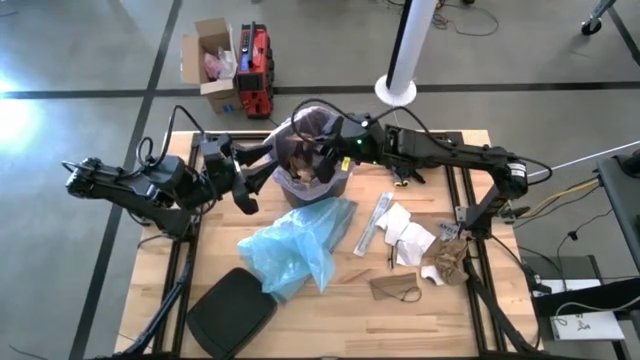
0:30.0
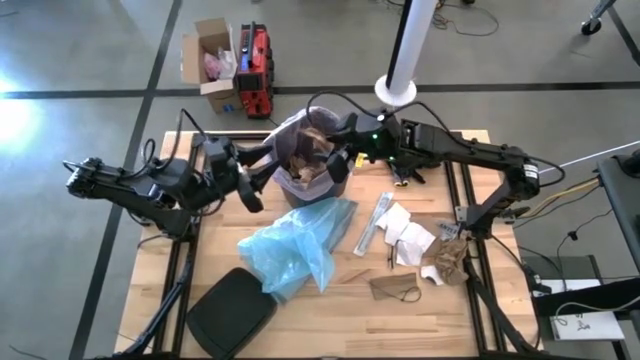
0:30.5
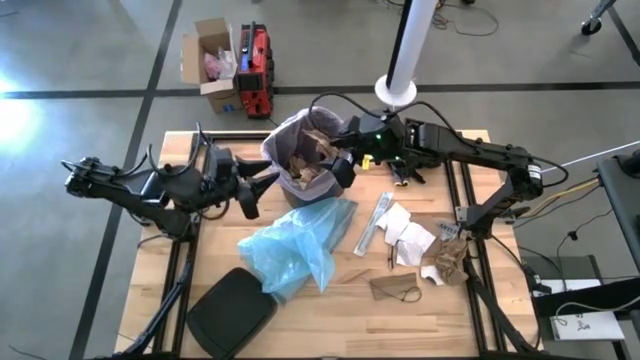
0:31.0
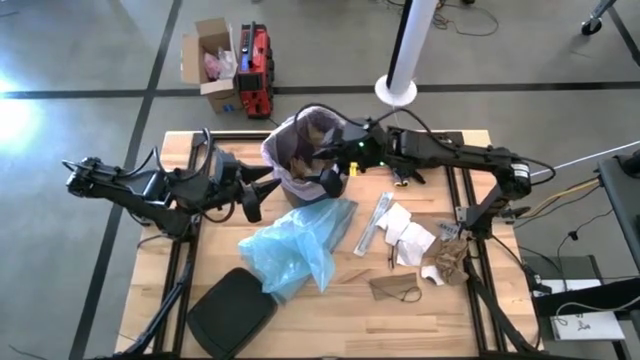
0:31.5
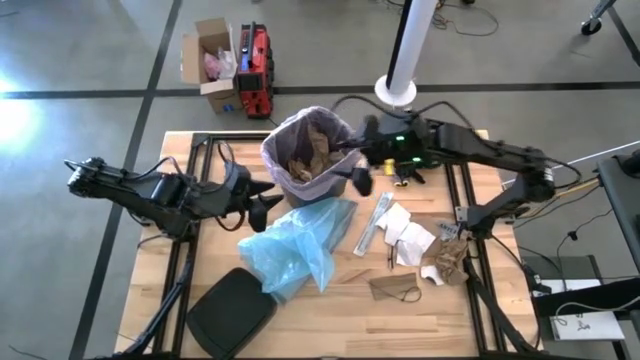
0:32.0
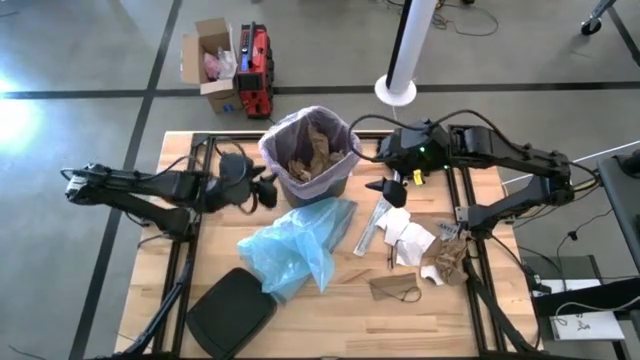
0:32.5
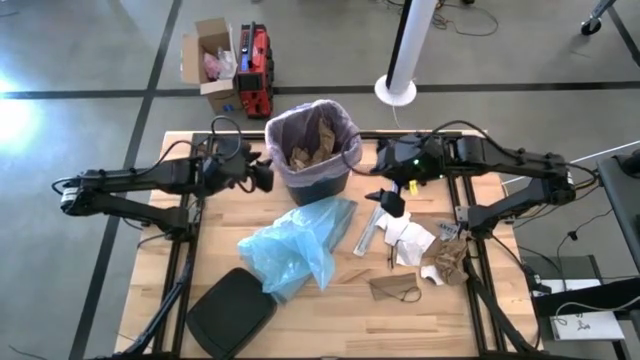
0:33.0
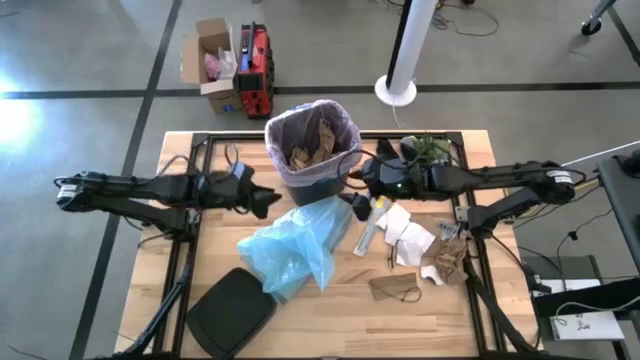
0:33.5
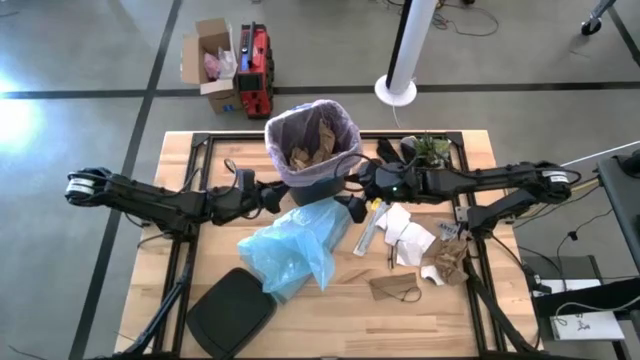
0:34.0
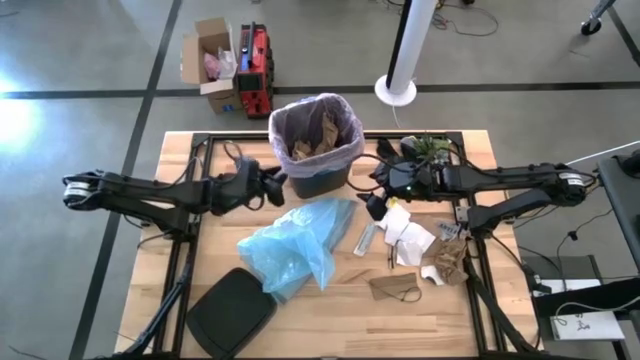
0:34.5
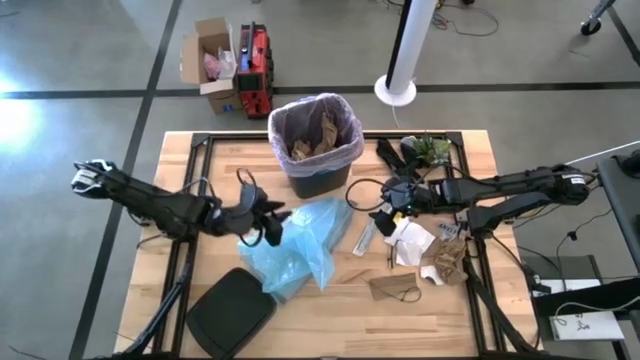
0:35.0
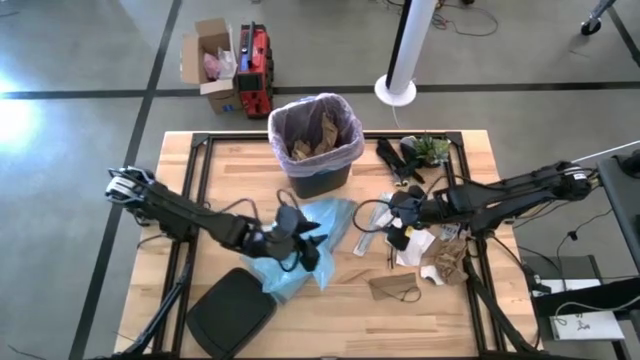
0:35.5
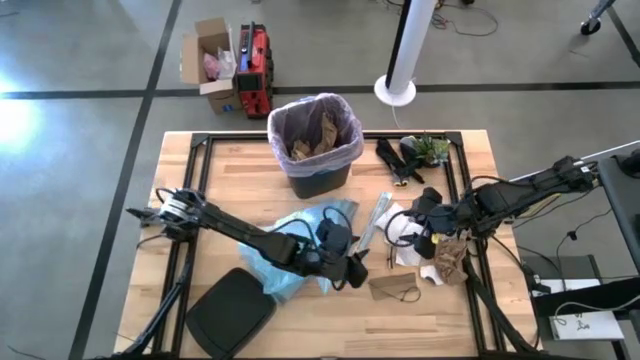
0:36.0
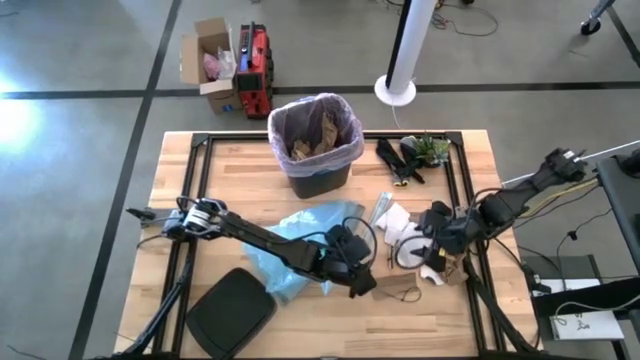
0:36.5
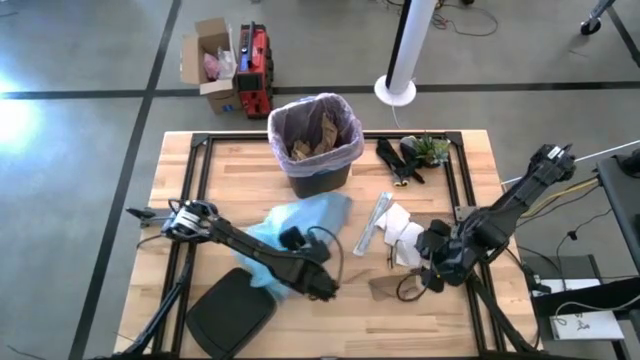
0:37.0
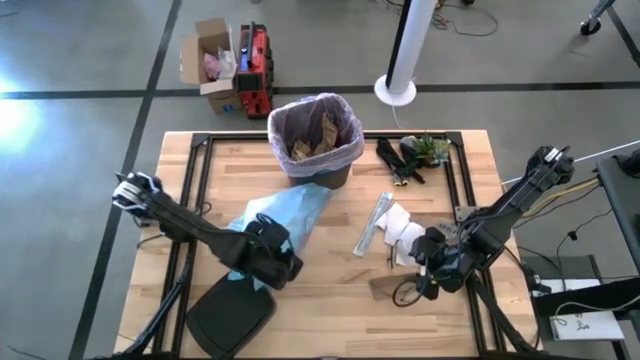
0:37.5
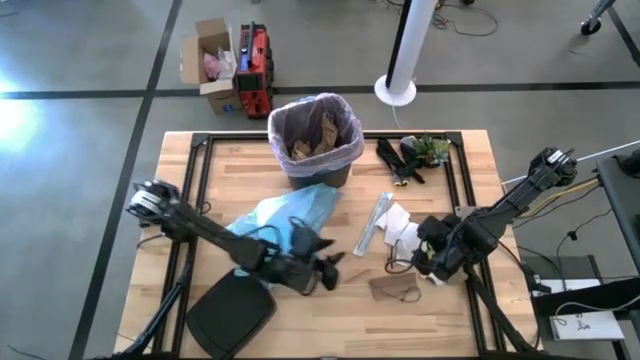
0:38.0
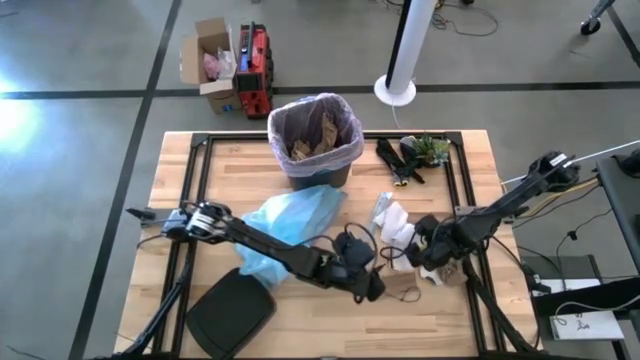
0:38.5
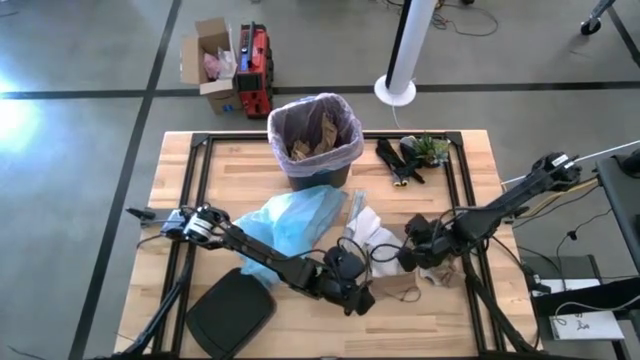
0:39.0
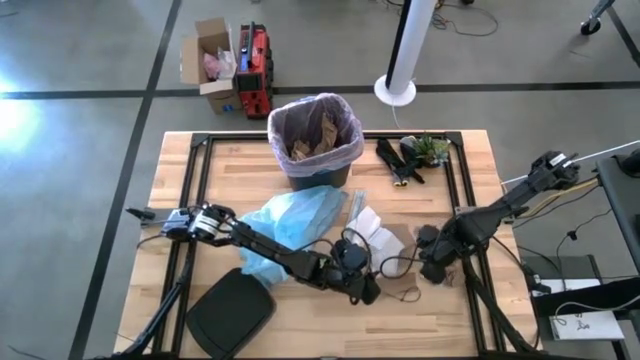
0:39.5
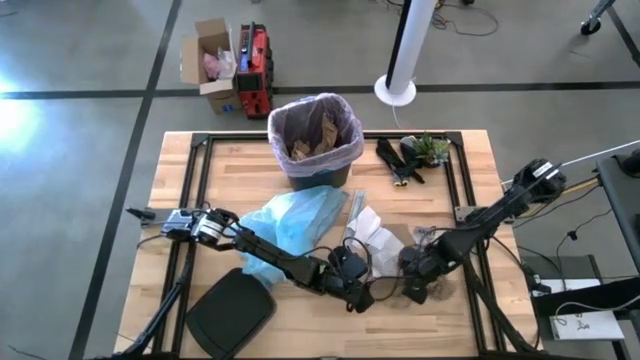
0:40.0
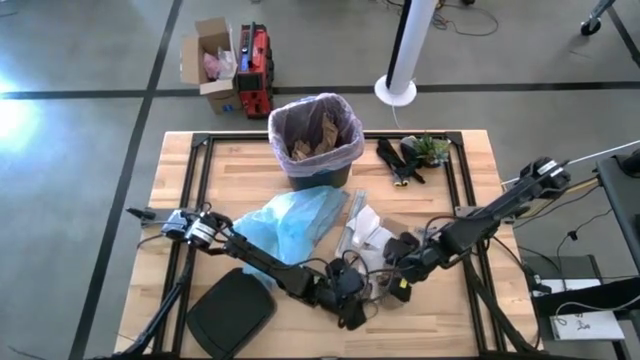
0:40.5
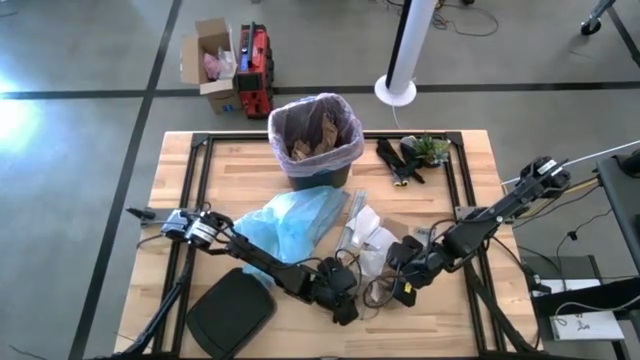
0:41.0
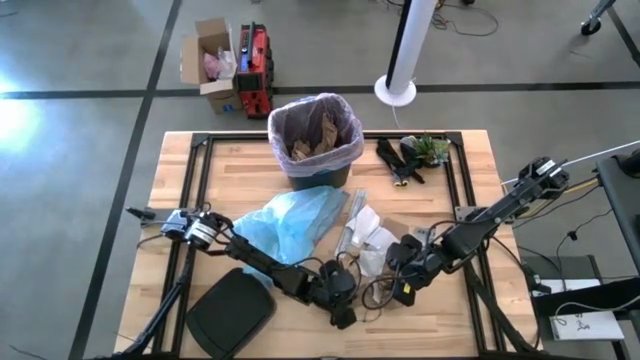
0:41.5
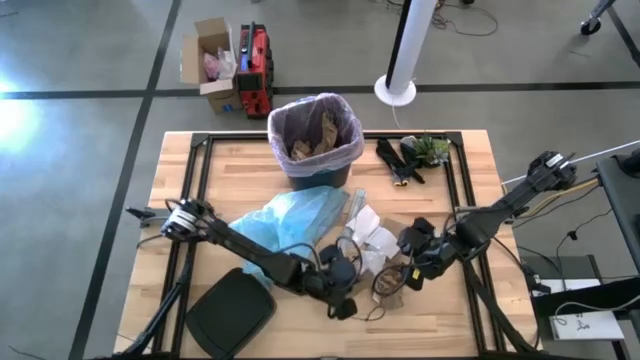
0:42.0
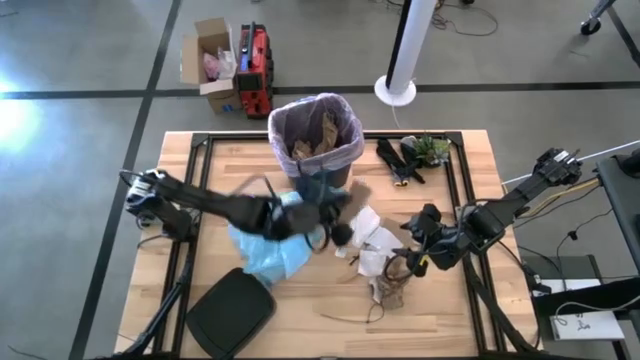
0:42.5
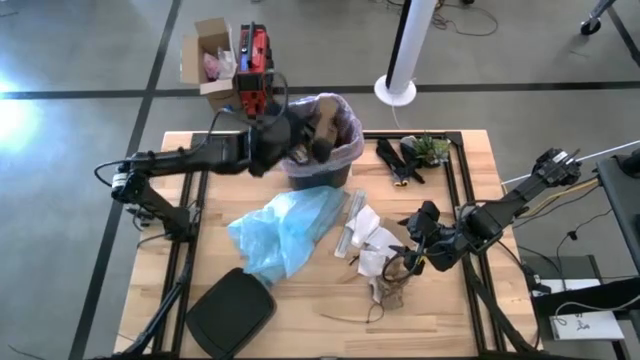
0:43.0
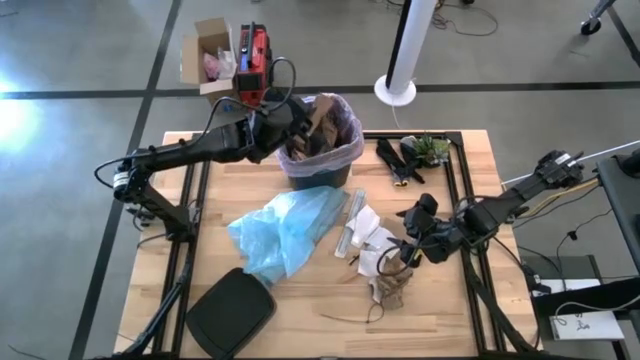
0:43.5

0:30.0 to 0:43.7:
Task: place trash/remove bag and relplace
Put the brown cardboard into the trash bin

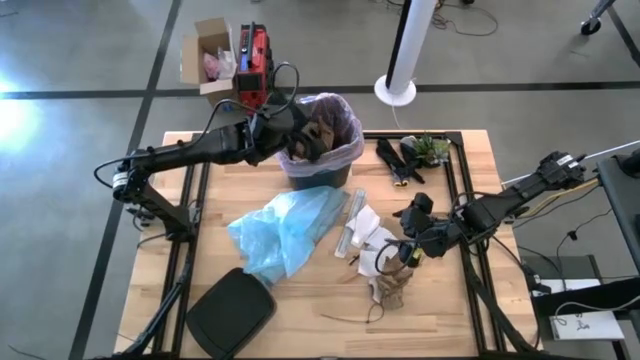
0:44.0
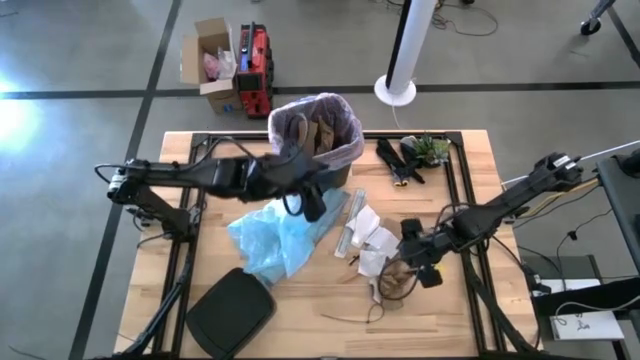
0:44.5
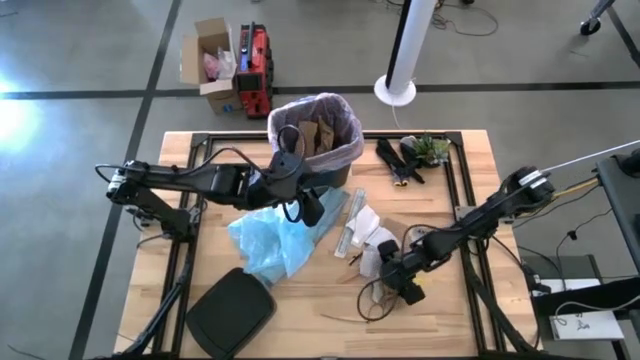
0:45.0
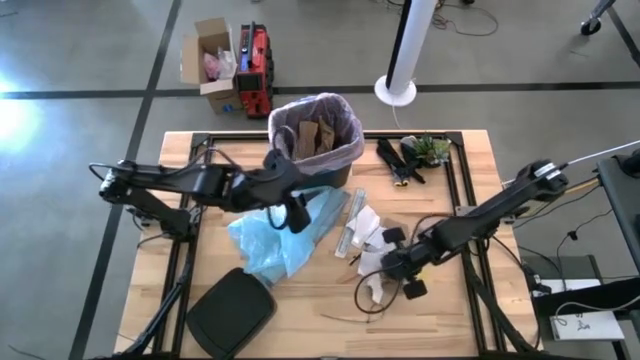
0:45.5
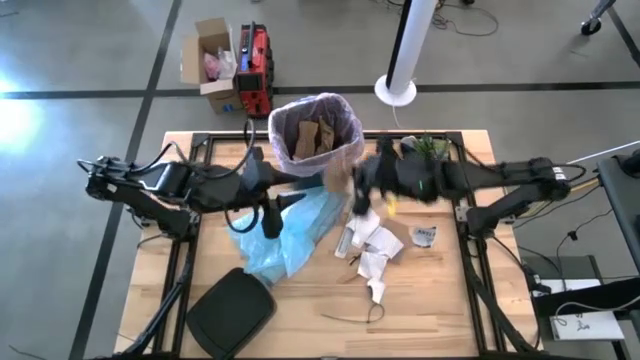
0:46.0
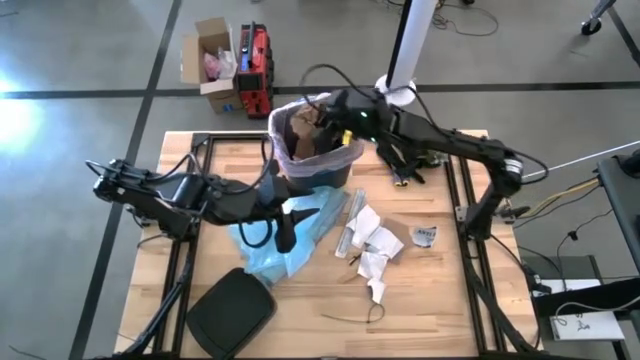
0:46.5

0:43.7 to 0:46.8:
Put the brown napkin into the trash bin

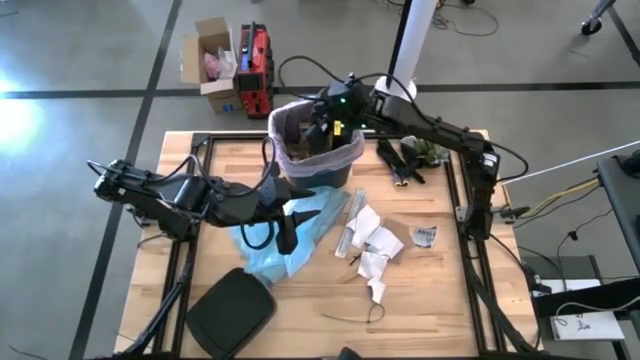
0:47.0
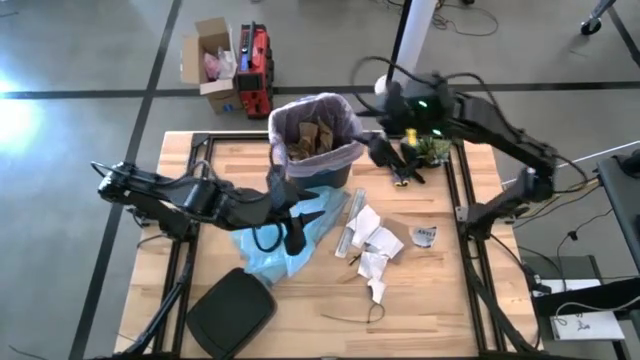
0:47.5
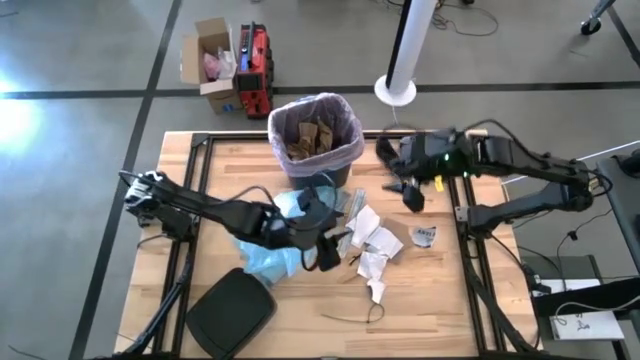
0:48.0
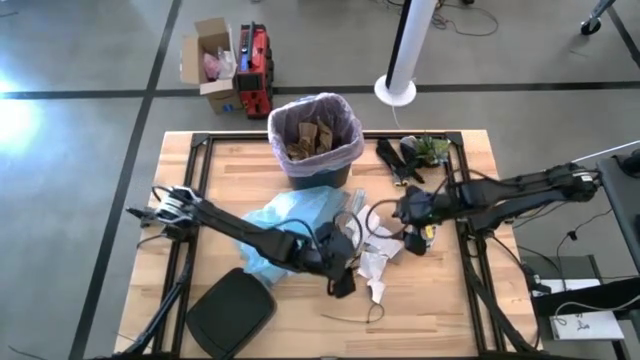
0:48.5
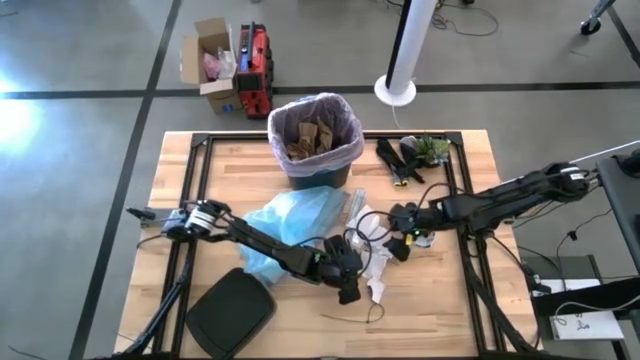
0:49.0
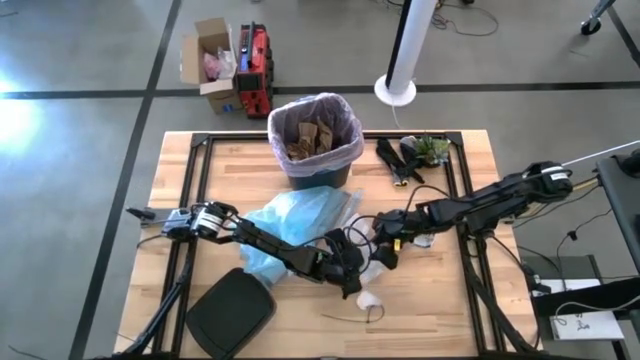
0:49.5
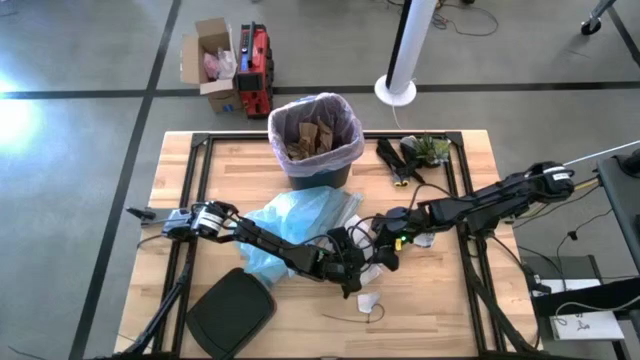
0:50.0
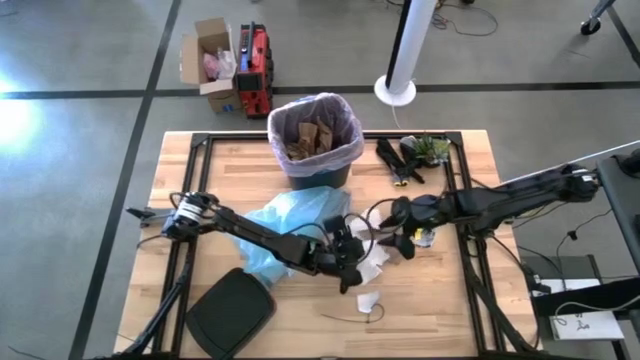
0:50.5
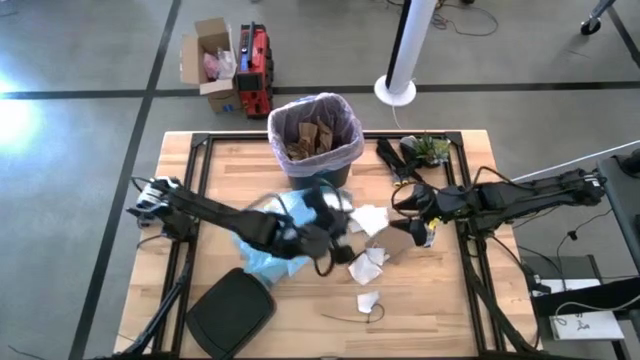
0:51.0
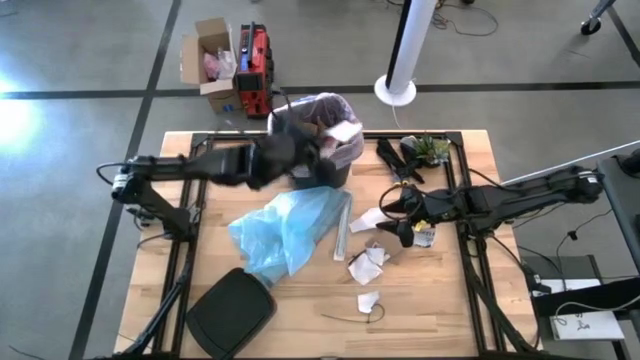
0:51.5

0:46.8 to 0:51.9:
Put the white paper into the trash bin

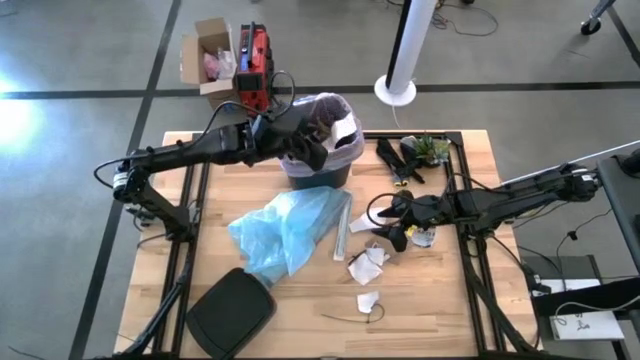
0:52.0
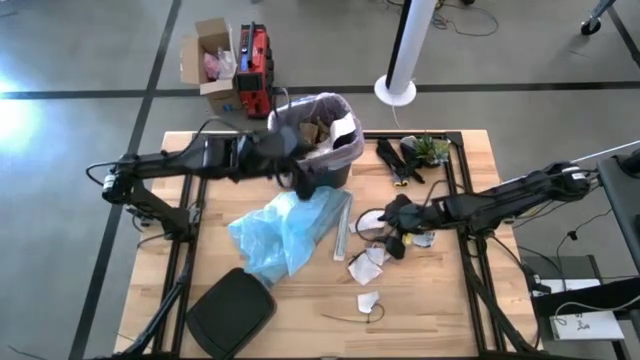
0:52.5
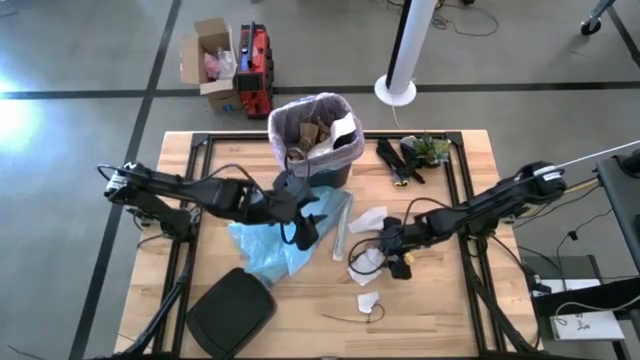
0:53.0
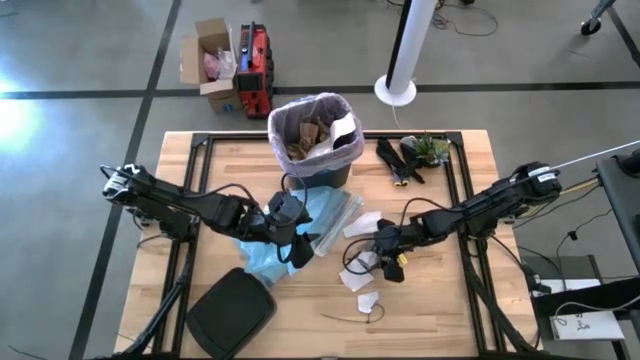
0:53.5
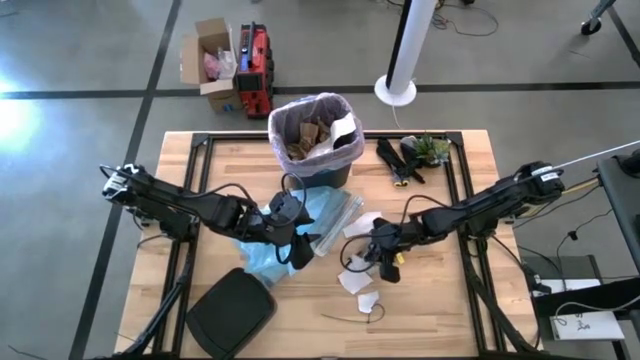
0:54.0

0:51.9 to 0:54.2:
Put the white paper into the trash bin
